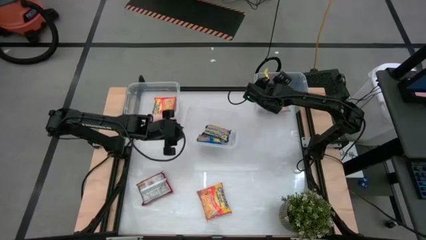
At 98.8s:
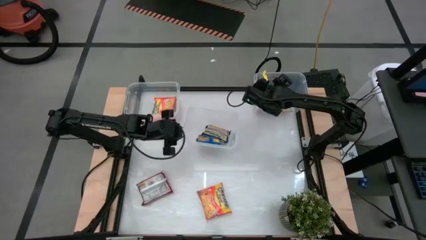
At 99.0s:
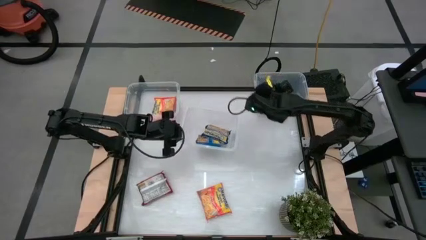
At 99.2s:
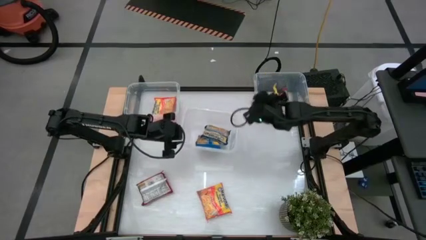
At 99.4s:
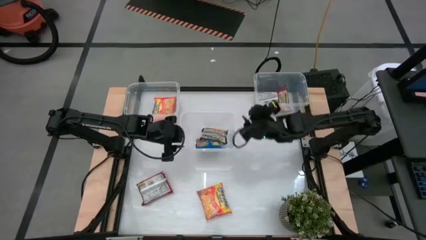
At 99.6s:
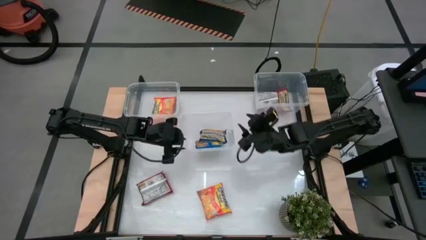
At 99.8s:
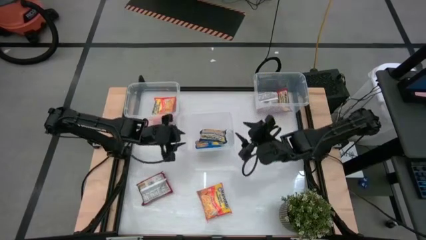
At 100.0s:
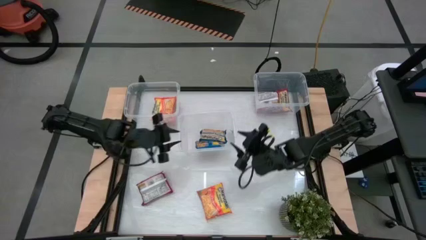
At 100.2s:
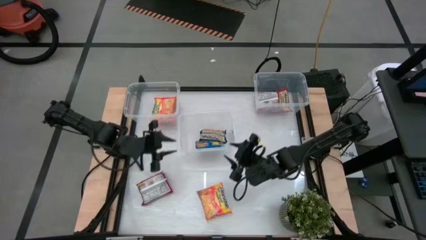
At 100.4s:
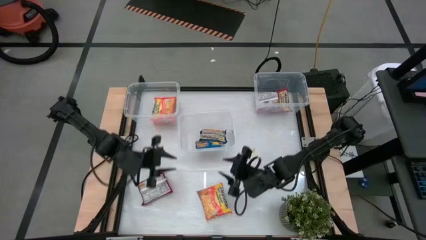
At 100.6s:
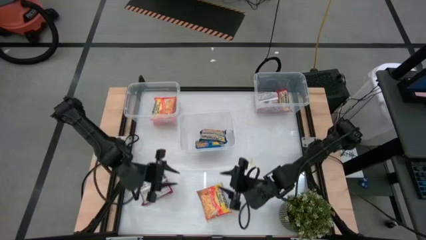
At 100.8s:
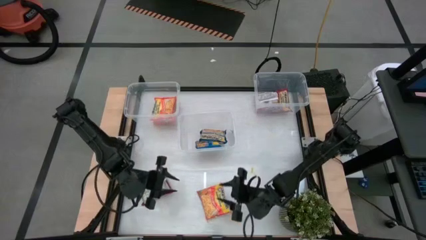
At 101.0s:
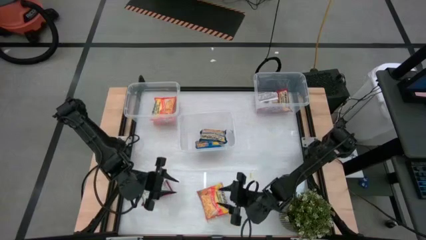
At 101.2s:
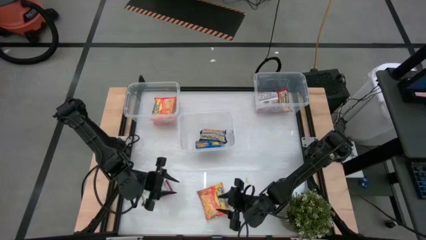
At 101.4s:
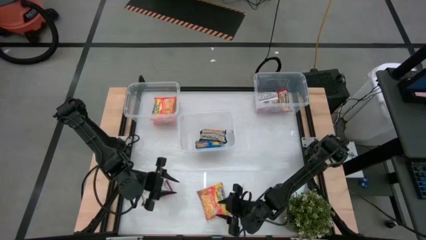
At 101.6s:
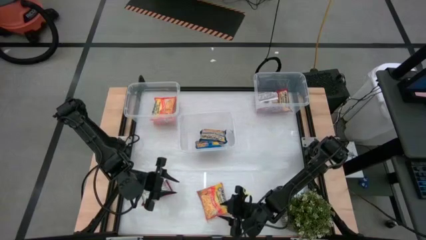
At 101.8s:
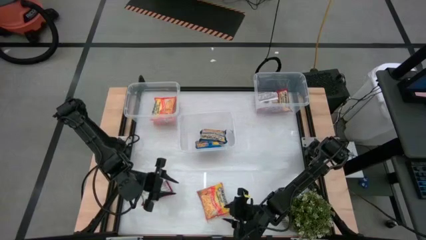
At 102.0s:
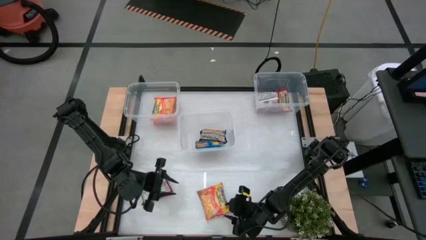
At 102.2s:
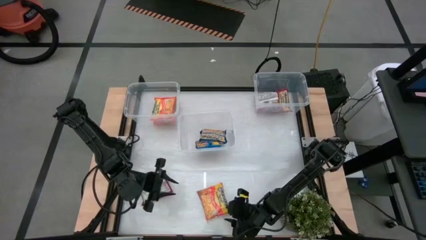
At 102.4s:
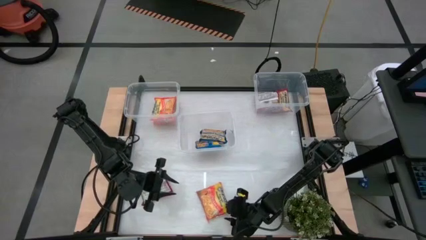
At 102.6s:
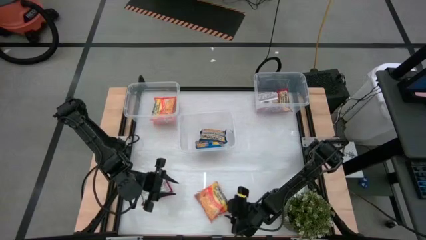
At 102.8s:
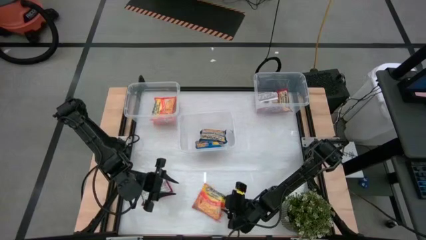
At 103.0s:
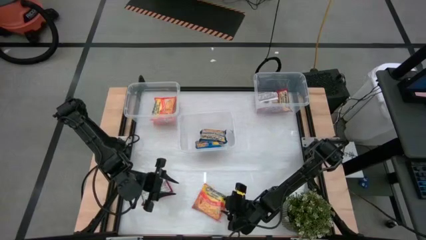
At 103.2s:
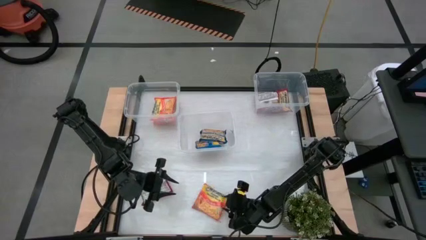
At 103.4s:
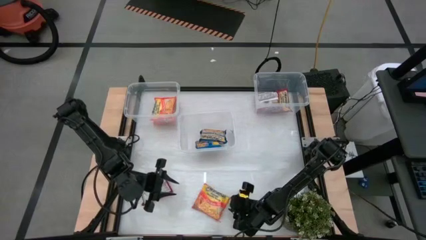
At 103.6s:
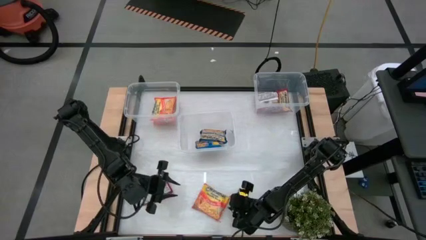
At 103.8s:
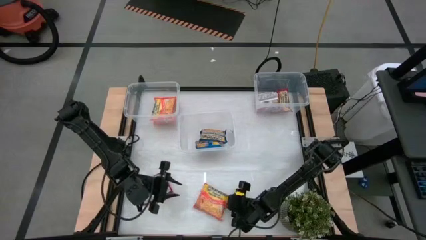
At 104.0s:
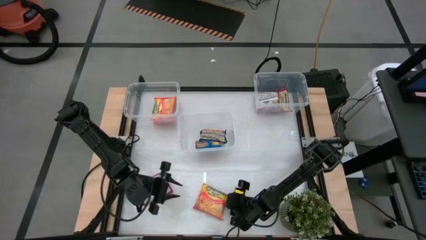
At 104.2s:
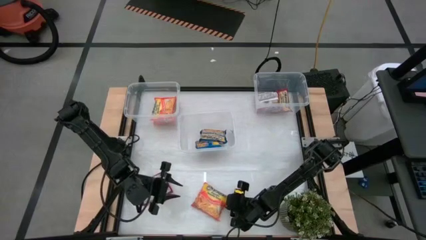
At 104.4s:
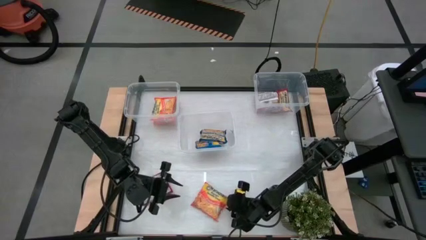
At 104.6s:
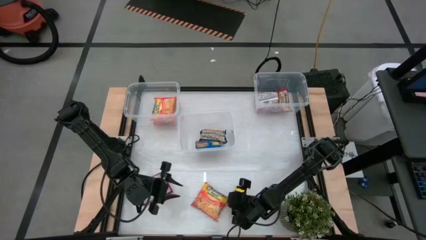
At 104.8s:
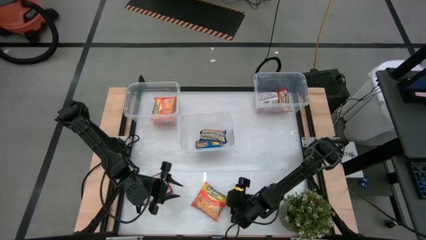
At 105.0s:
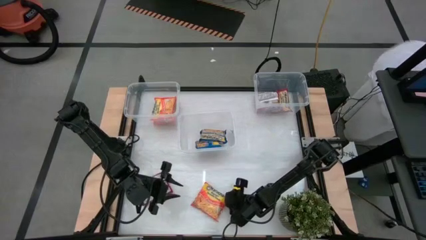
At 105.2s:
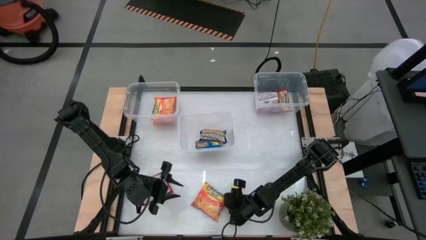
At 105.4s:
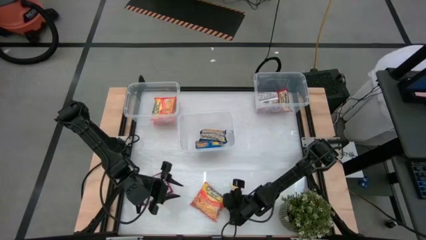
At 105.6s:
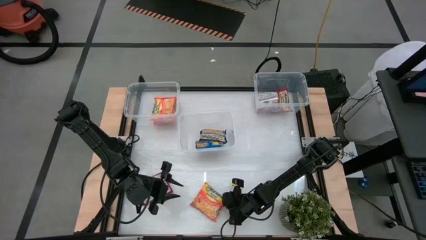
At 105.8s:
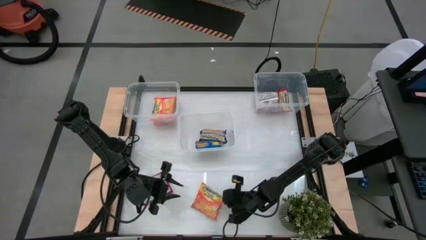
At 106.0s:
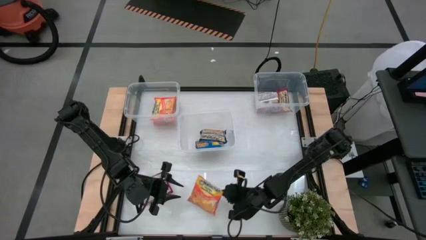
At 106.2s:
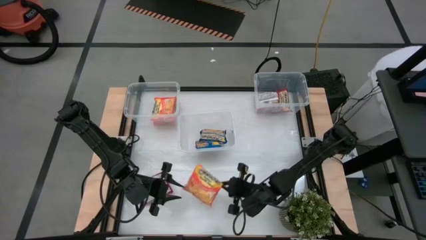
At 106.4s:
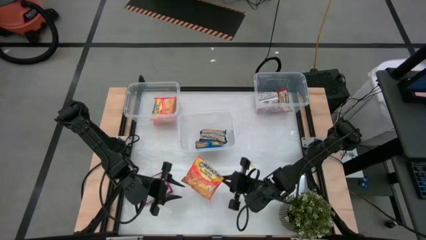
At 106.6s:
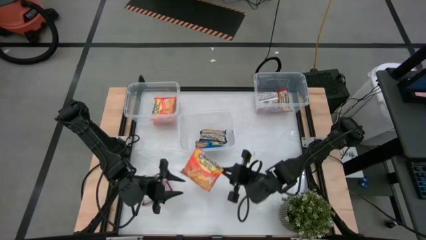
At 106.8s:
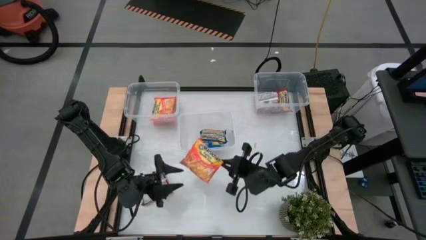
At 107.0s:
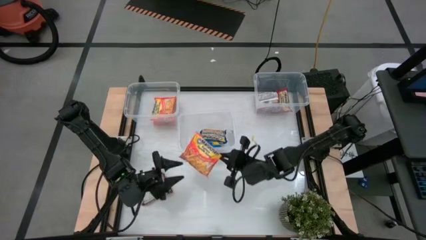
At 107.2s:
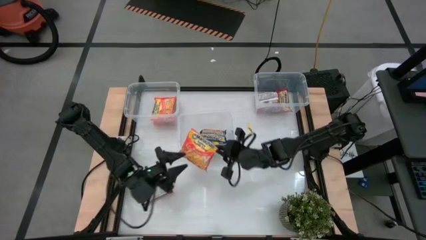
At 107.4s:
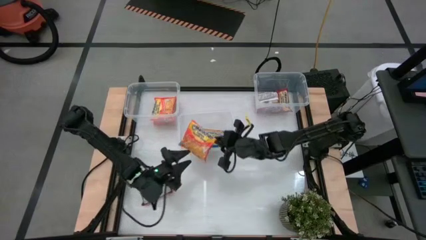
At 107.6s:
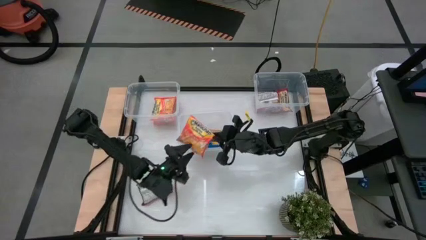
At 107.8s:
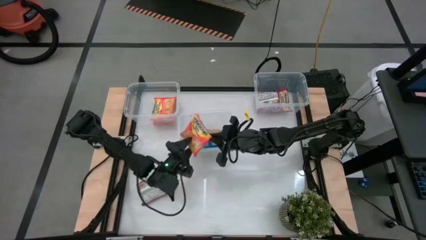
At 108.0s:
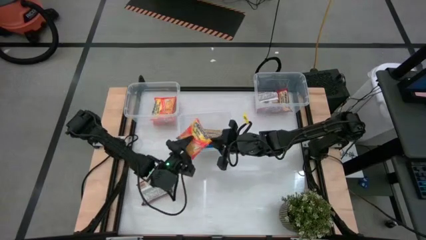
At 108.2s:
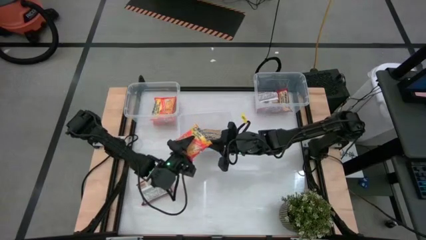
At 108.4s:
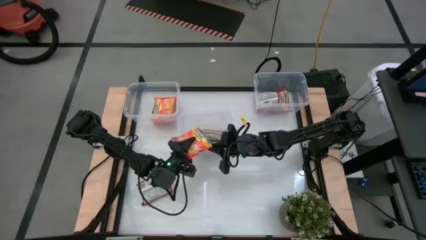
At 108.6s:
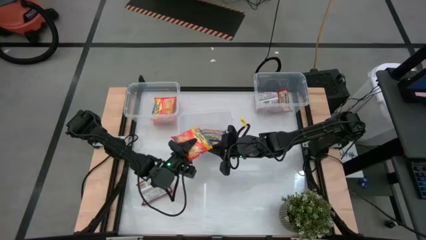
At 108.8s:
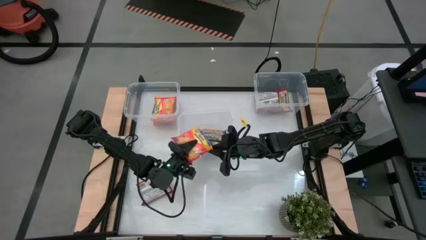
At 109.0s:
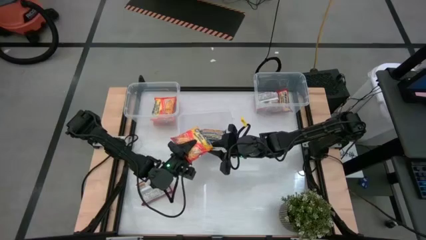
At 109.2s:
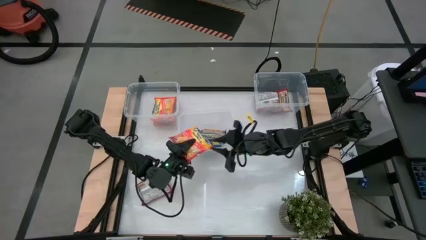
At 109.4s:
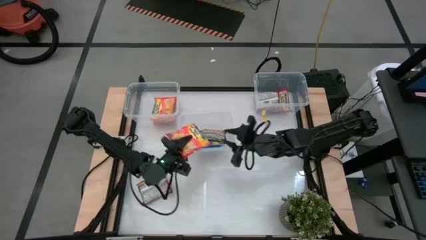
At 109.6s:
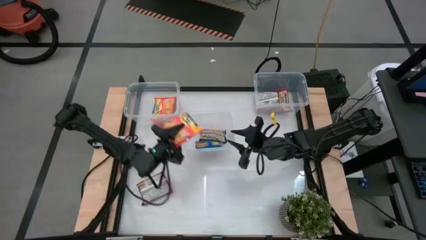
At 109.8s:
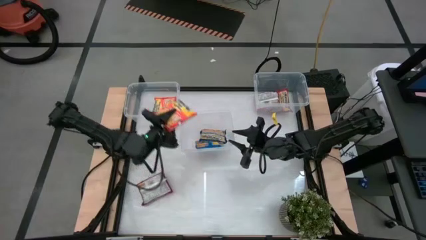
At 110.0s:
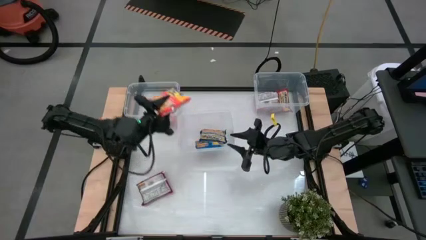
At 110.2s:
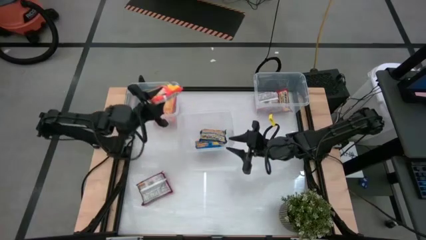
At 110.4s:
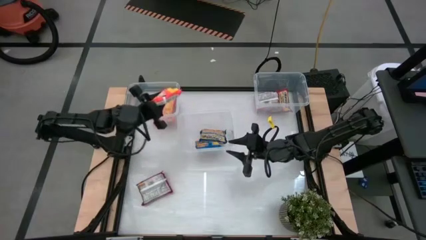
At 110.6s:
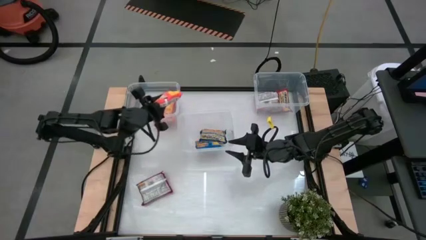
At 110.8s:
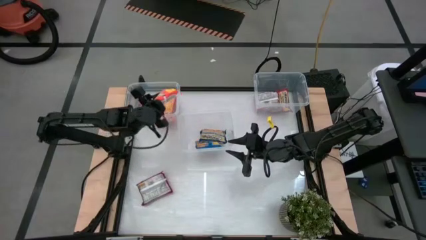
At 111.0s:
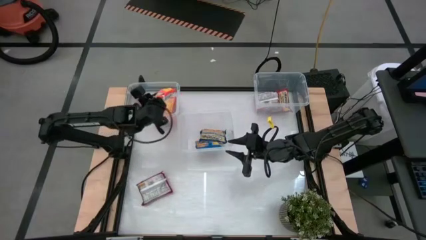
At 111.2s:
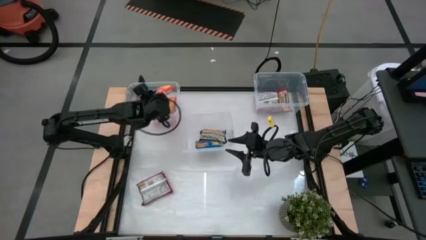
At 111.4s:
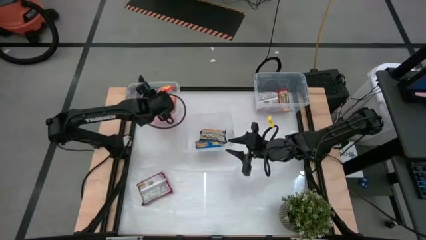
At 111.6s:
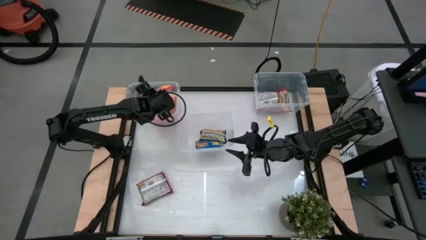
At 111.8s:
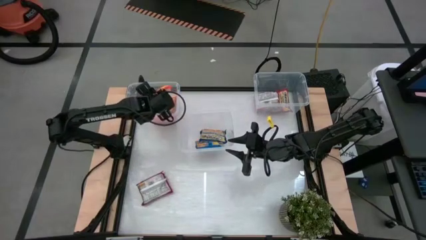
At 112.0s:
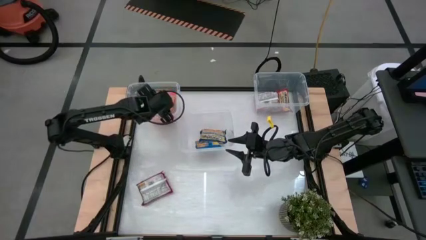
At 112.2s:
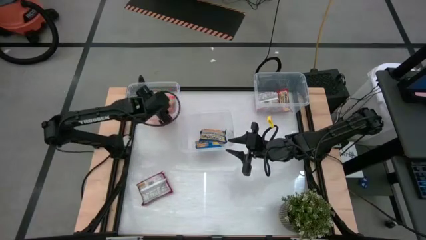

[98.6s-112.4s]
Task: Sort Maruchan noodles
Put the orange noodle pack into the top left transparent bin
